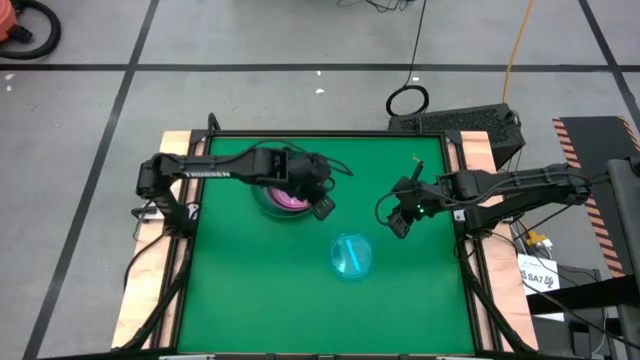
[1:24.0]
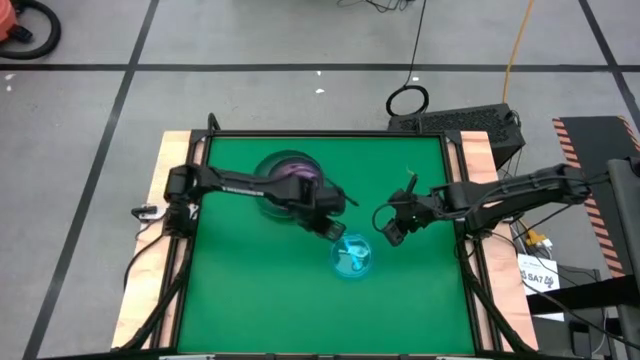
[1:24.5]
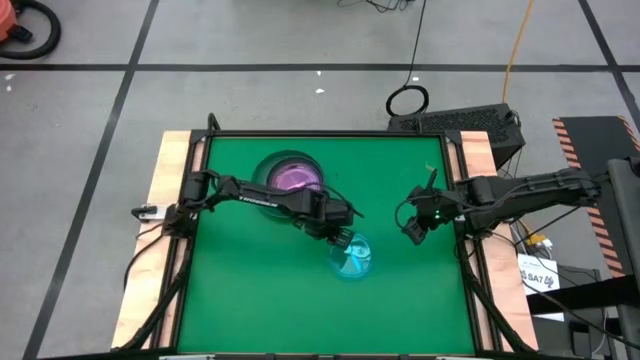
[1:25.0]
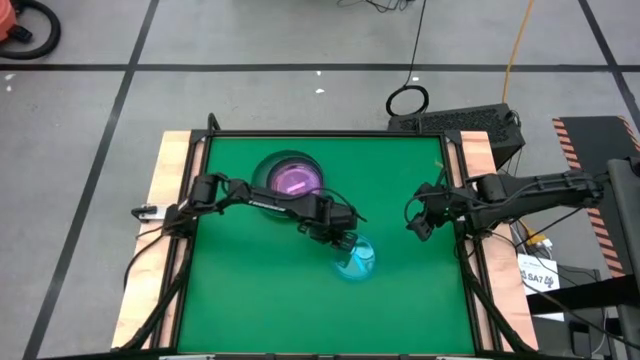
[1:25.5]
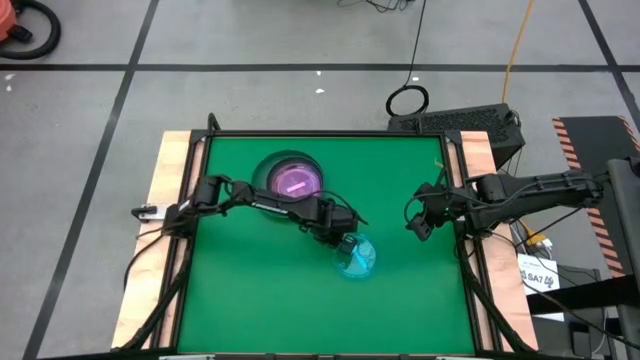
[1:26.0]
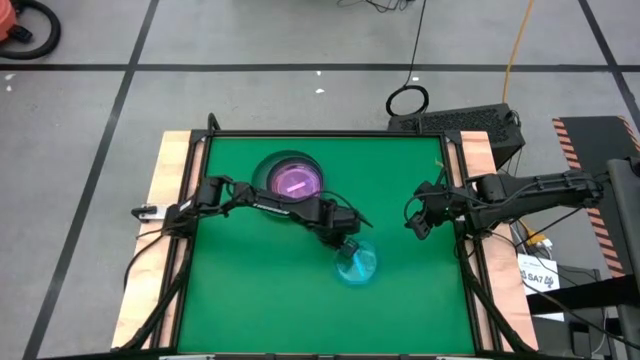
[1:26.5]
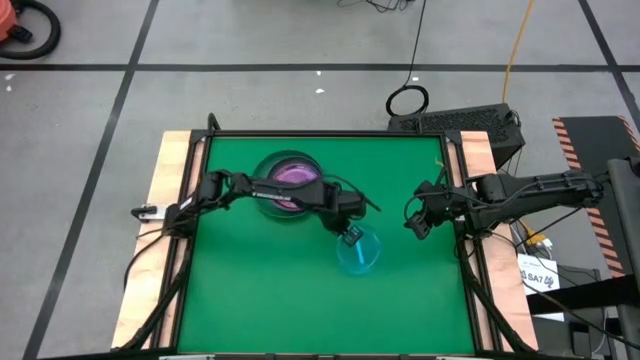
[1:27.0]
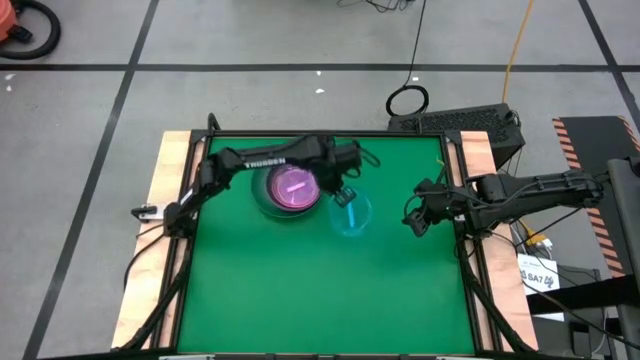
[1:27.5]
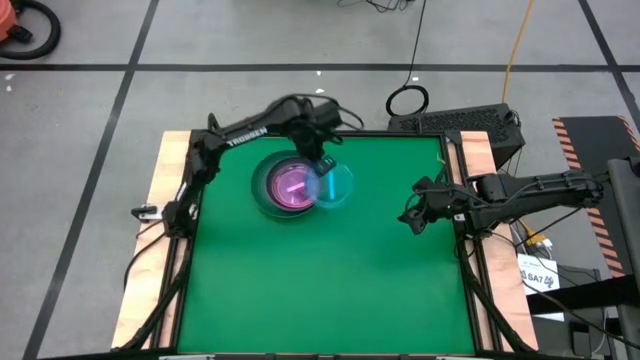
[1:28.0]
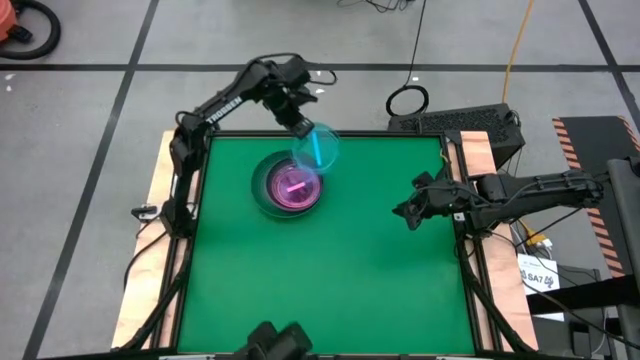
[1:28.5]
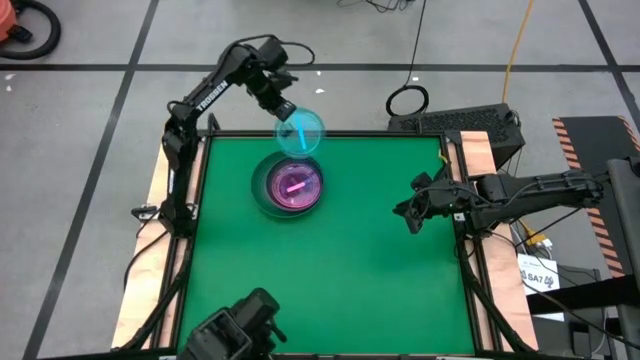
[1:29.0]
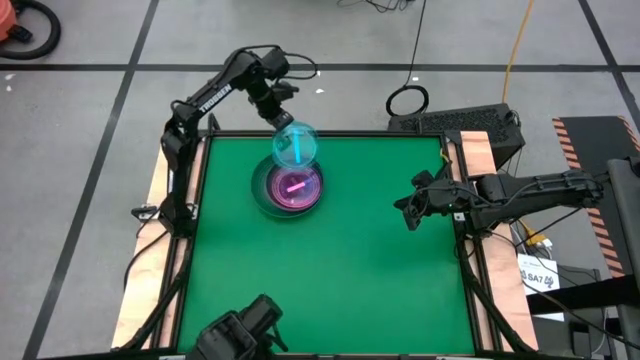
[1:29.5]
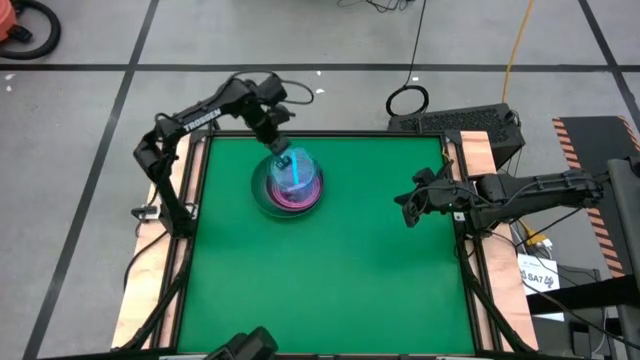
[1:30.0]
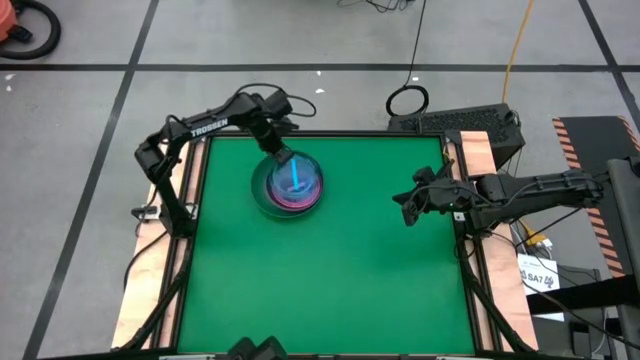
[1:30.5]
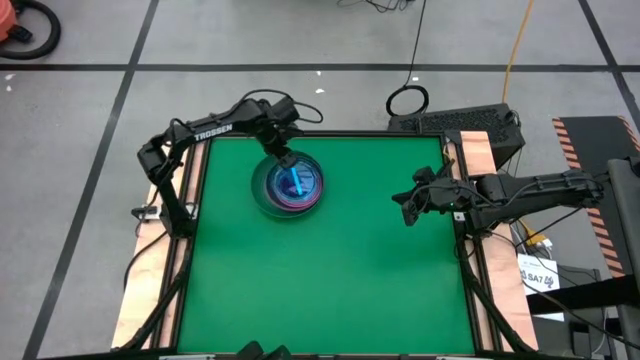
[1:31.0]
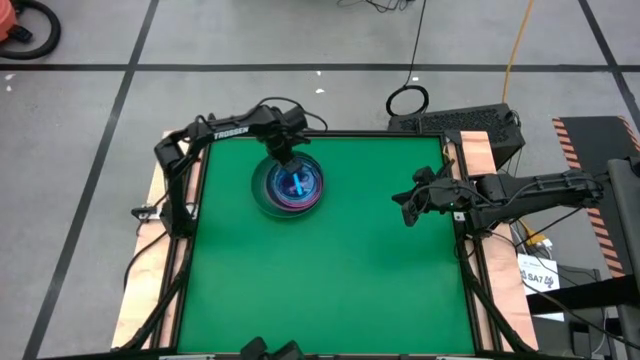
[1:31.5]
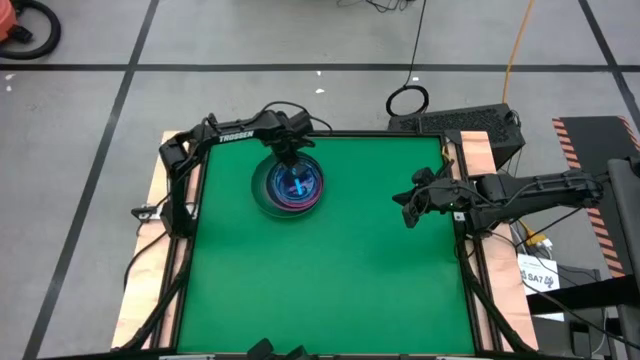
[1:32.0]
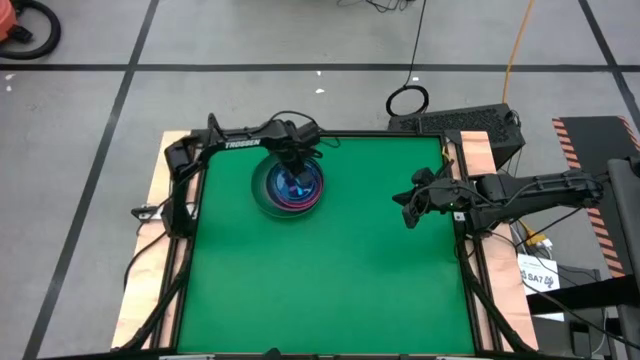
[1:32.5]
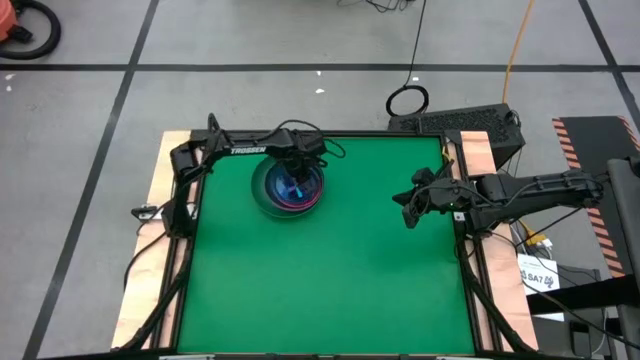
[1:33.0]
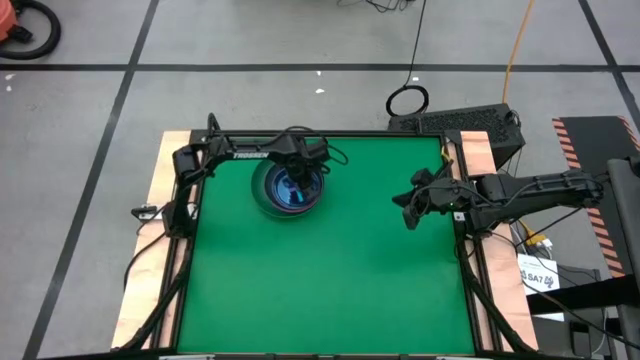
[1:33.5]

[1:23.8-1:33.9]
Task: Stack plastic plates
Stack the blue plate on the pink plate

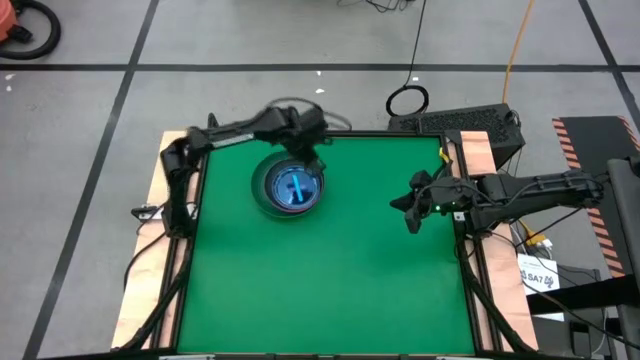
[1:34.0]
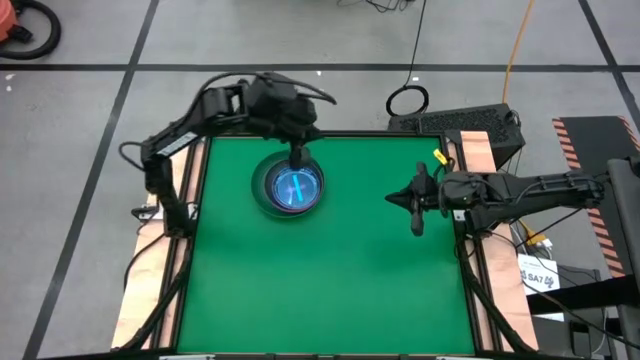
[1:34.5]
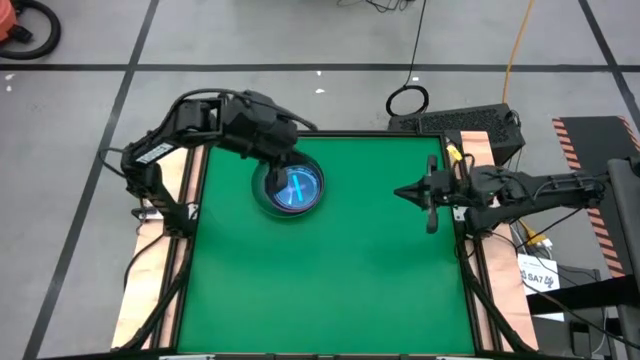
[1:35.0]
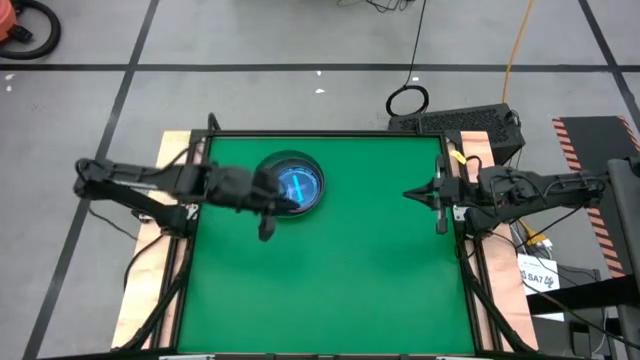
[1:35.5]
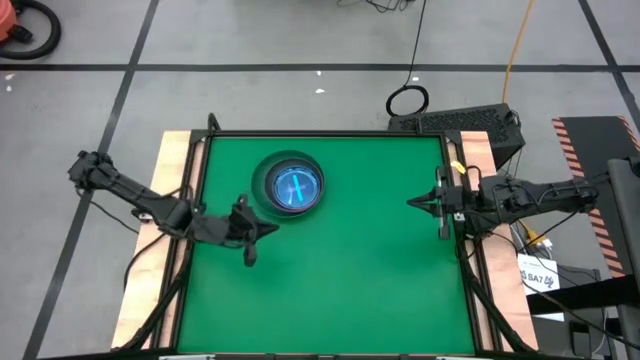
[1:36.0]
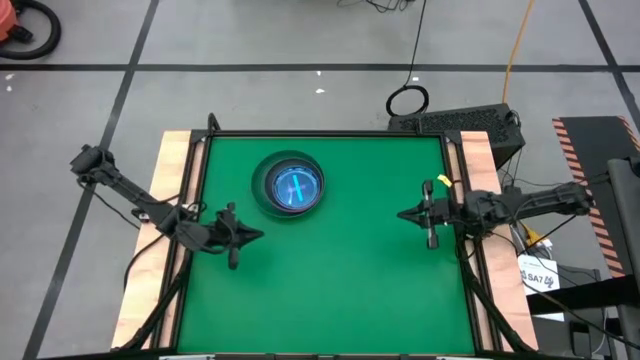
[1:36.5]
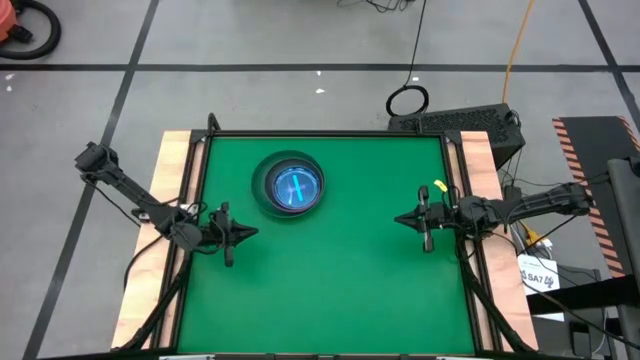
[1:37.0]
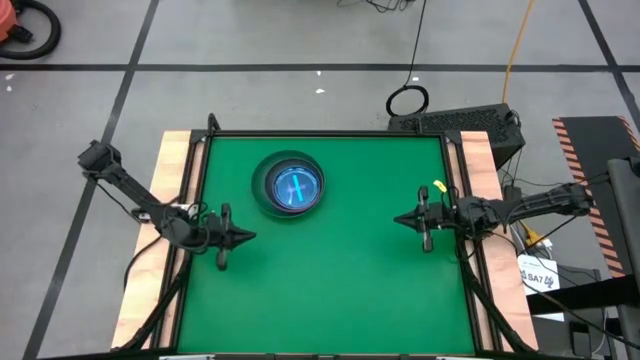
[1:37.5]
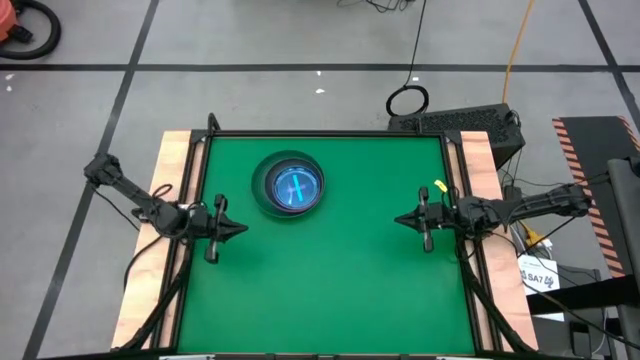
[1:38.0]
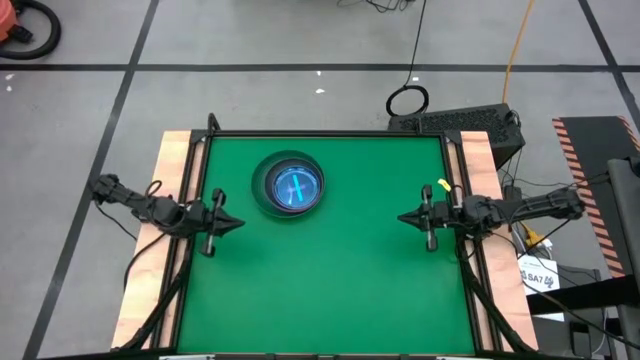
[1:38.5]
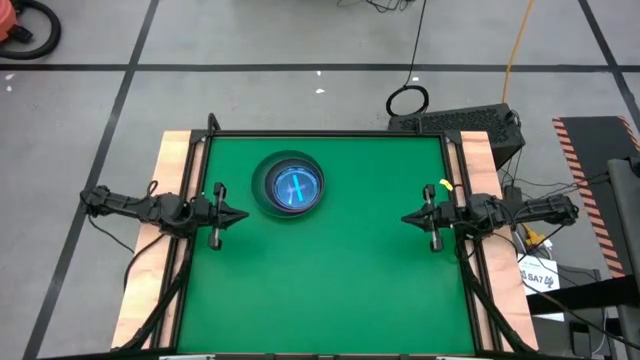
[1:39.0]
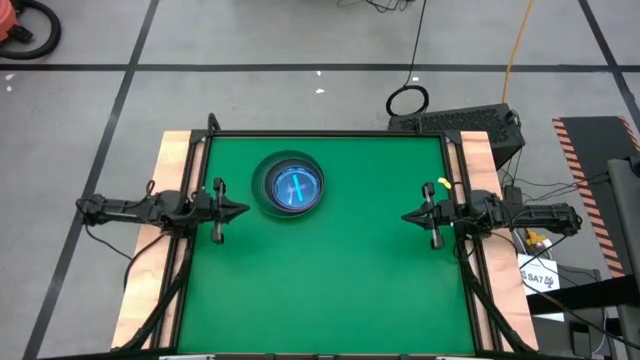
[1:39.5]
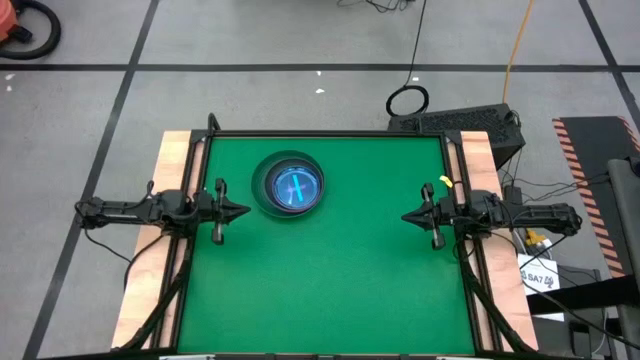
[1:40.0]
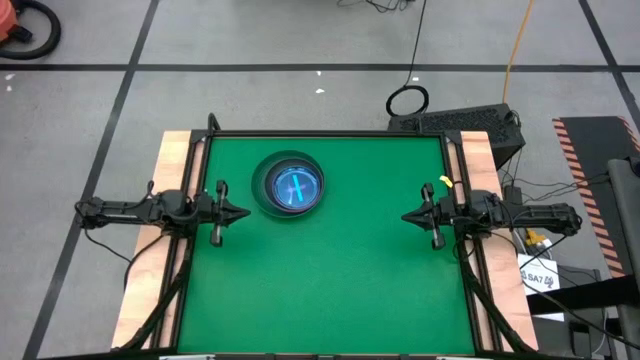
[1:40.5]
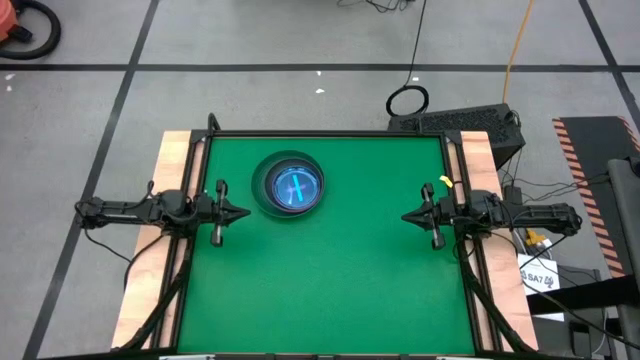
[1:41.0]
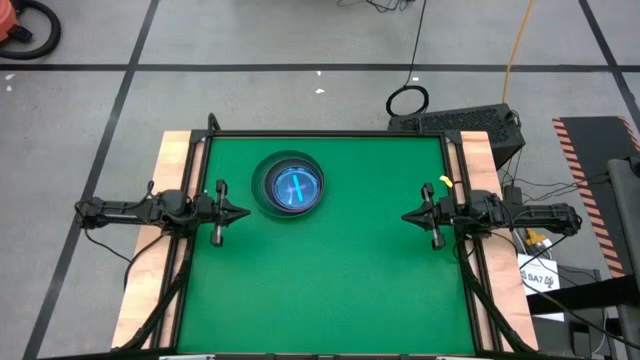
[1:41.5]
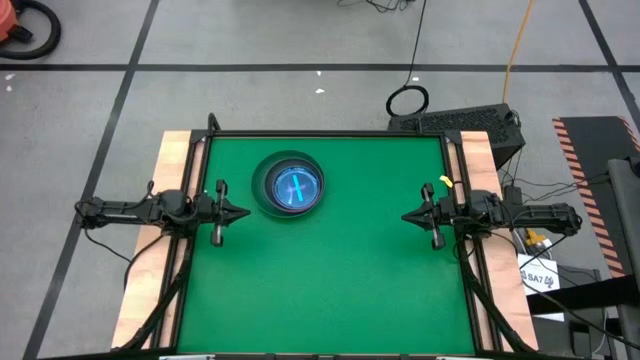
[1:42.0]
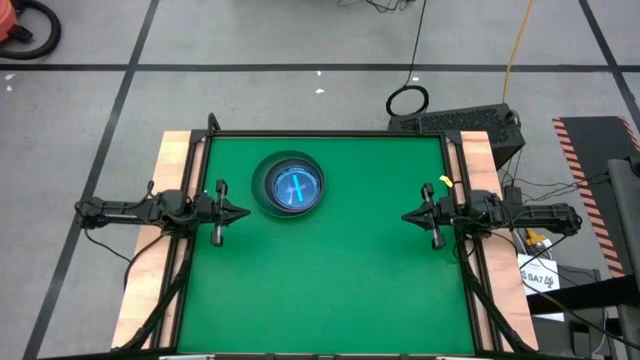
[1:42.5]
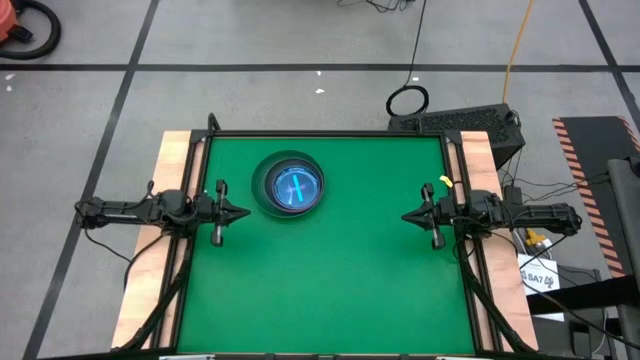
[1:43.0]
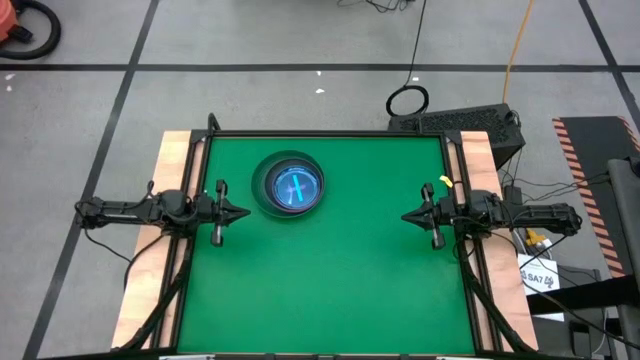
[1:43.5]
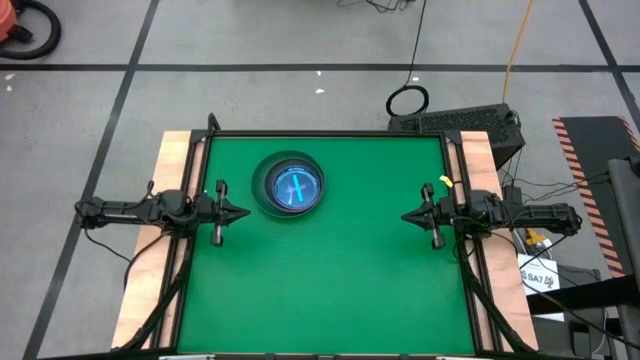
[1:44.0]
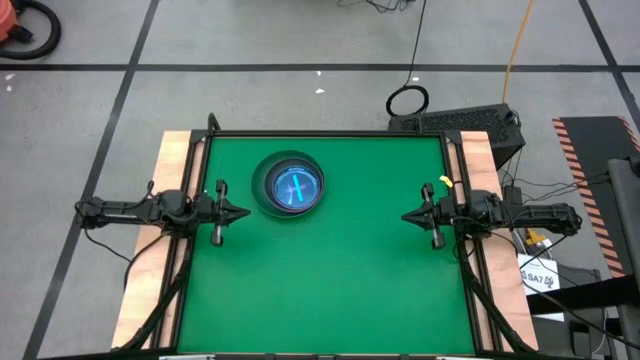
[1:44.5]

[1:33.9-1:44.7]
Return to Home Position

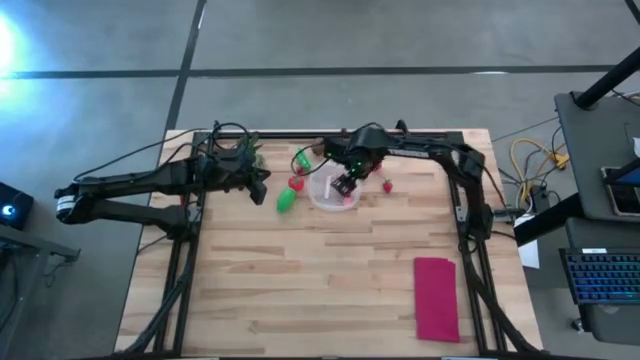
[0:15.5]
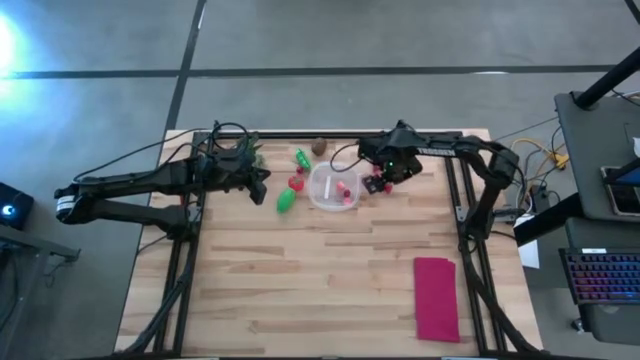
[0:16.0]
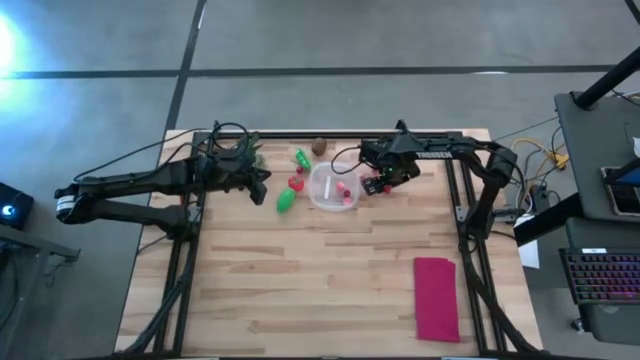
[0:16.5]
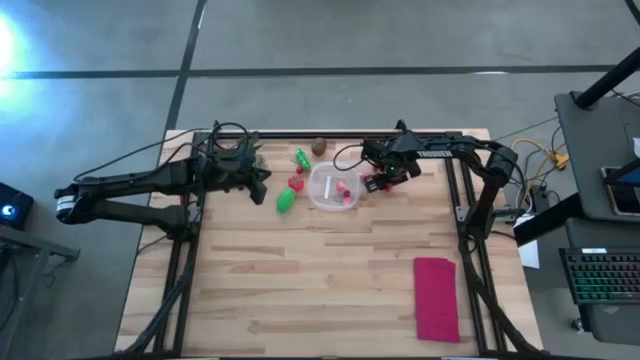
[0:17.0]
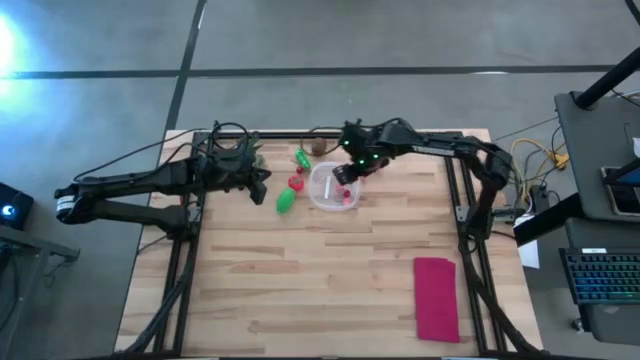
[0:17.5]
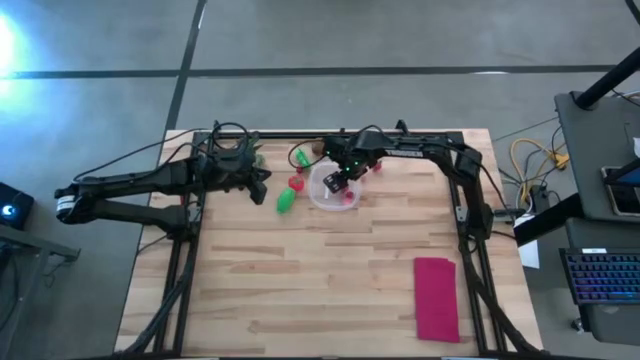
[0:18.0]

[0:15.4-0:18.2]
Task: Pick and placing Produce into tupperware
Put the right strawberry into the transparent bin
